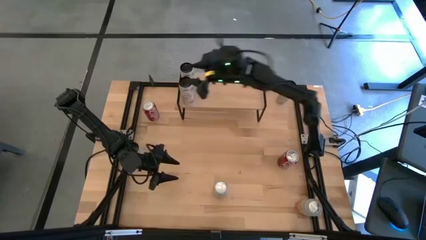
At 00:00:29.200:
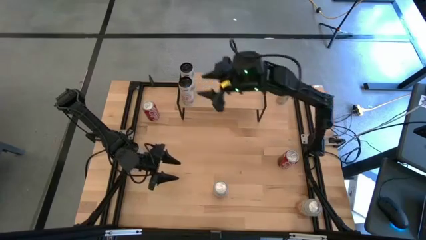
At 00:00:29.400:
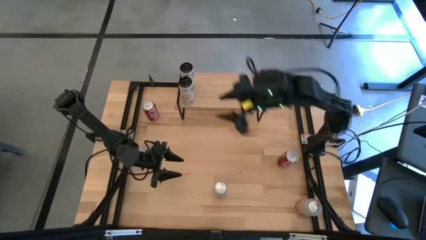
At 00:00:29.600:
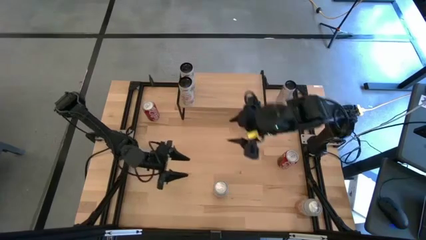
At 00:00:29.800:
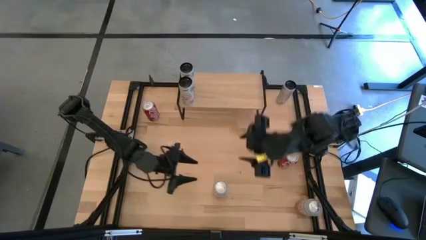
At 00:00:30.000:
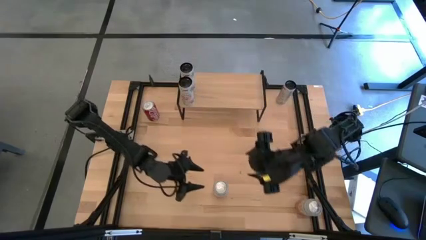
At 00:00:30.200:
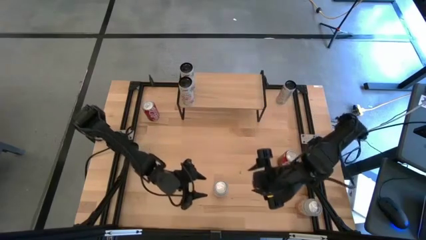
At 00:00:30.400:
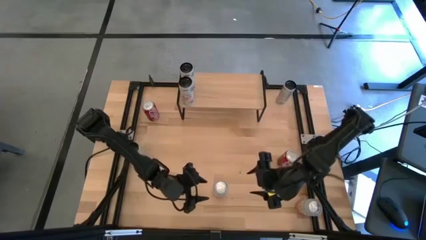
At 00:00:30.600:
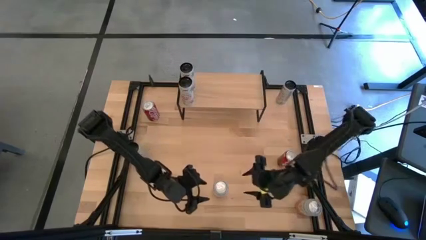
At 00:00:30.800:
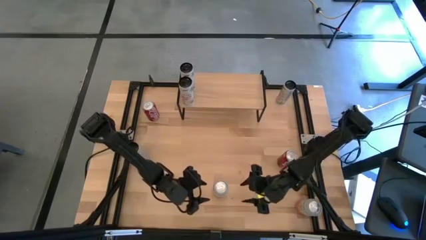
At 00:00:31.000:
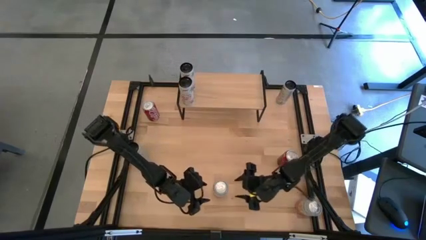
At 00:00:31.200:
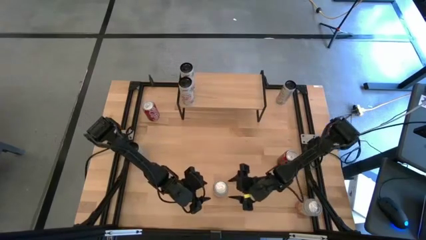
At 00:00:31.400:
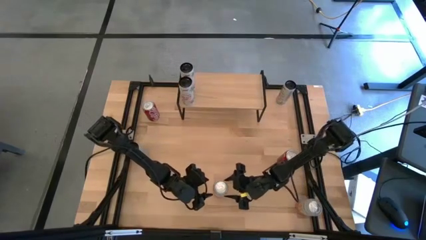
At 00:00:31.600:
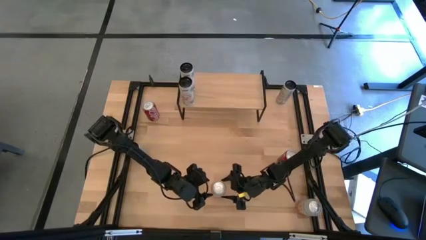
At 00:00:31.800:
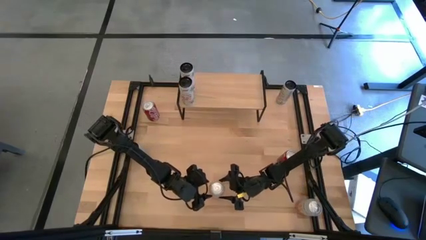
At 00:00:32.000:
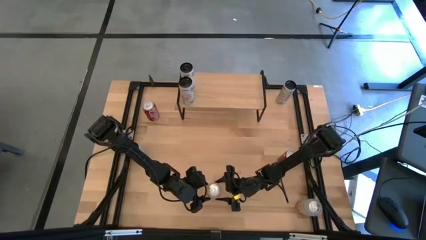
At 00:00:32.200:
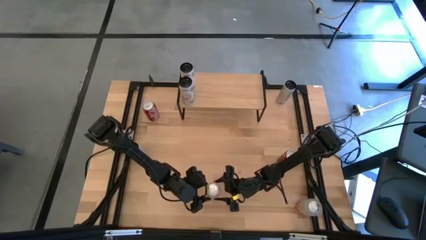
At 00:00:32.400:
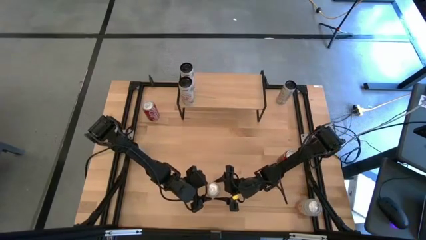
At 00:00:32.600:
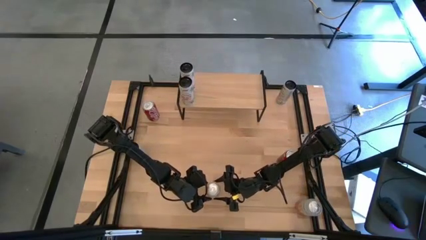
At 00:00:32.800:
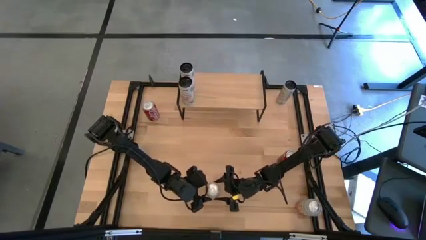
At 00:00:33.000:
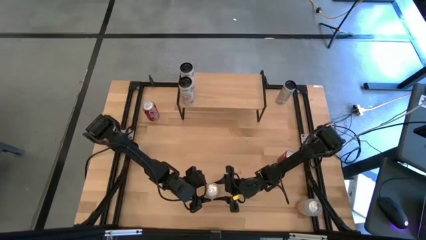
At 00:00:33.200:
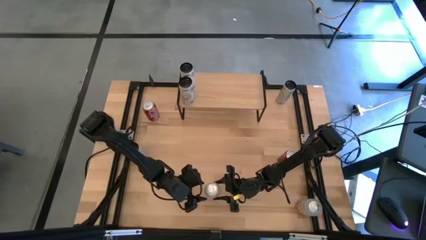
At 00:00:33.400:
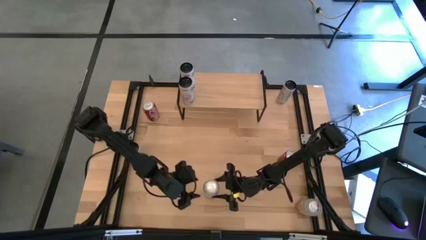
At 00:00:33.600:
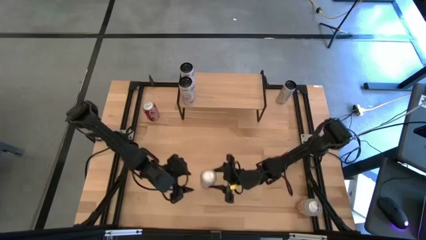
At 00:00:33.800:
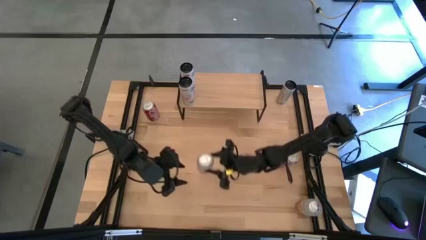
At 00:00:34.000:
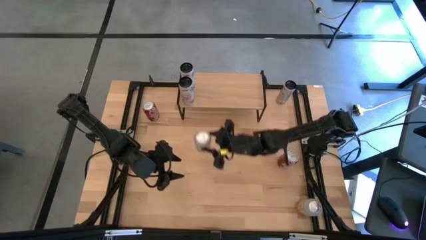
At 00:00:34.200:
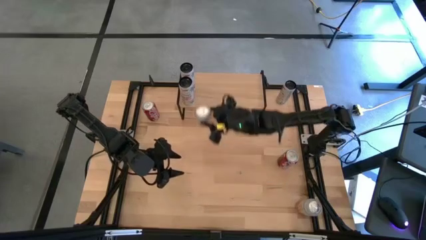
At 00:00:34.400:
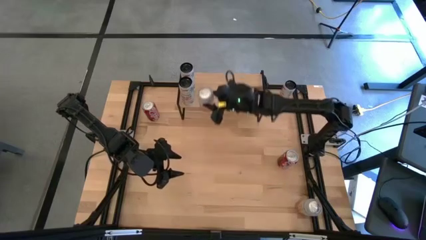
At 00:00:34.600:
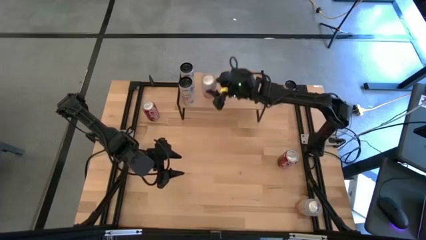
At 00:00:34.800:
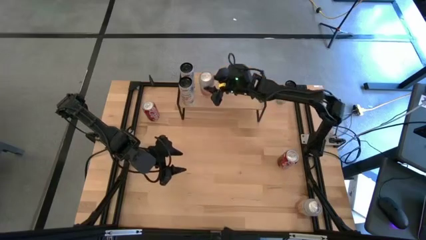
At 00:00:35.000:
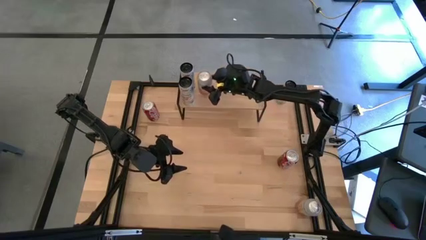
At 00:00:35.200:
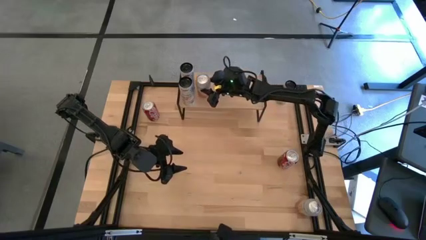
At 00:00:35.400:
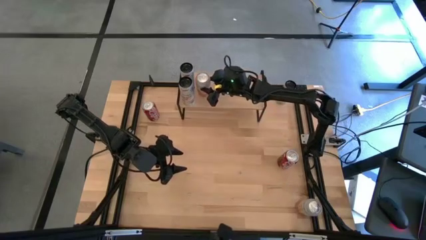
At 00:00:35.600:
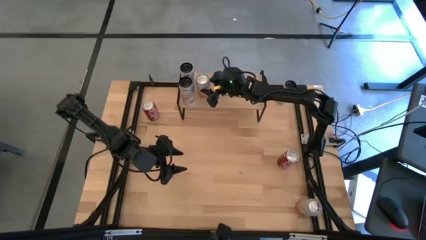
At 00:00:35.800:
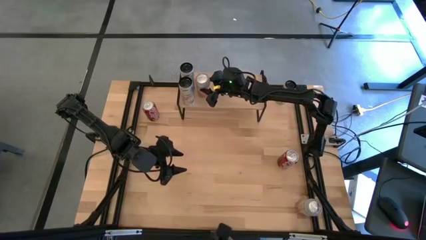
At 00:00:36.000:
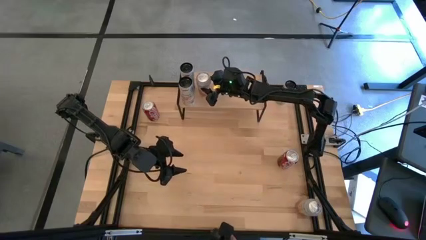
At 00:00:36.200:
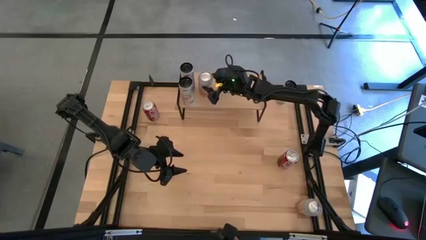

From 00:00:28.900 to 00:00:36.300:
Task: Place canned beverage on shelf
Put the left orange white soda can on the shelf

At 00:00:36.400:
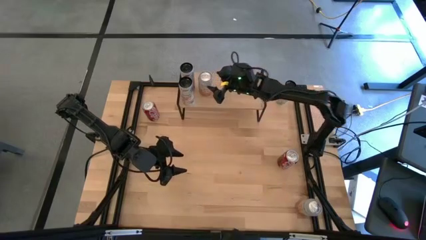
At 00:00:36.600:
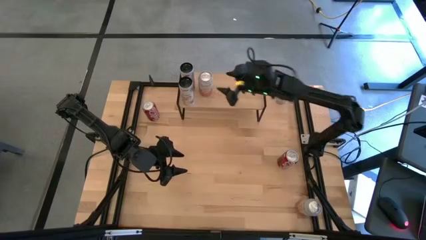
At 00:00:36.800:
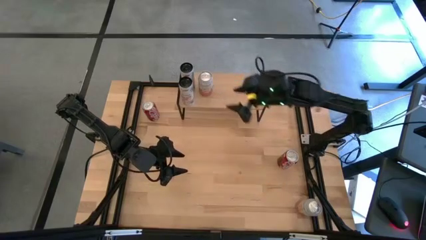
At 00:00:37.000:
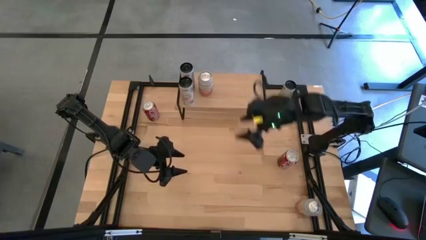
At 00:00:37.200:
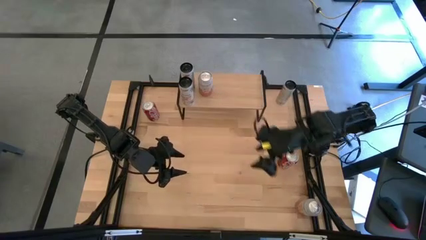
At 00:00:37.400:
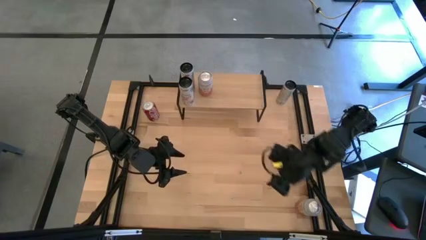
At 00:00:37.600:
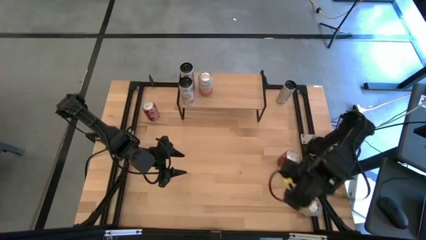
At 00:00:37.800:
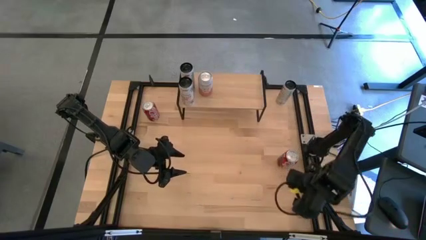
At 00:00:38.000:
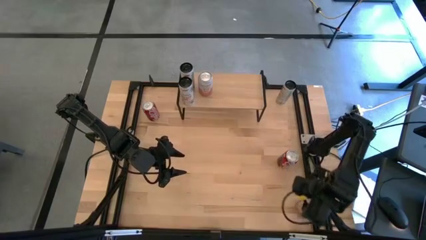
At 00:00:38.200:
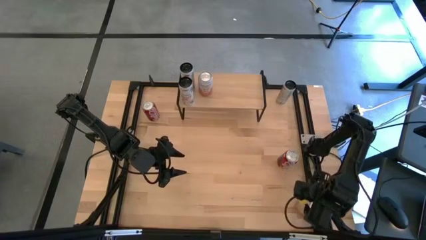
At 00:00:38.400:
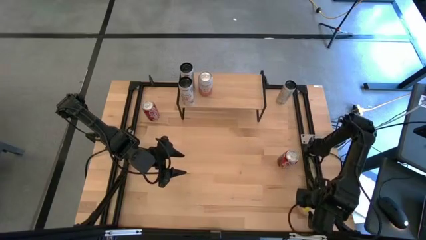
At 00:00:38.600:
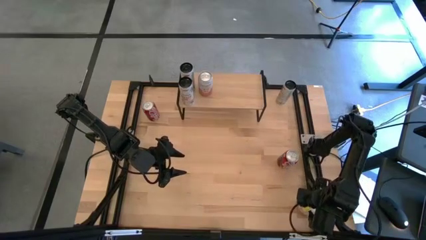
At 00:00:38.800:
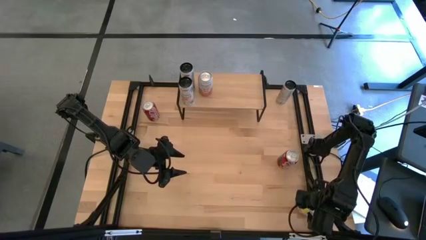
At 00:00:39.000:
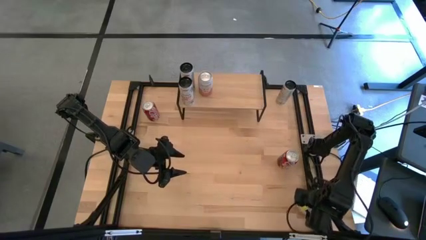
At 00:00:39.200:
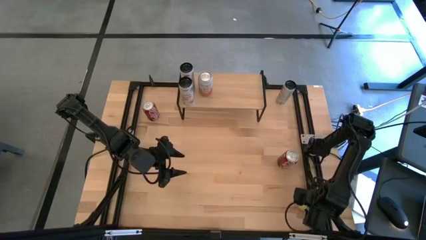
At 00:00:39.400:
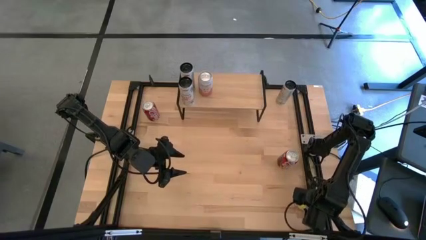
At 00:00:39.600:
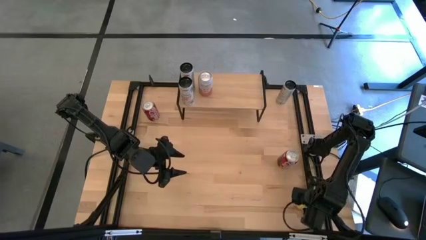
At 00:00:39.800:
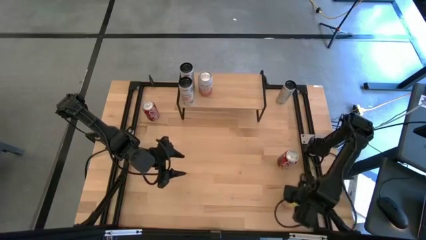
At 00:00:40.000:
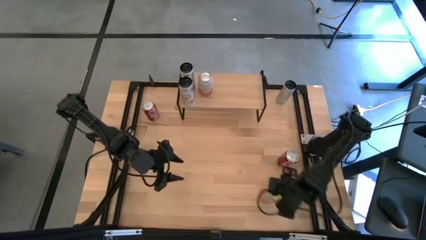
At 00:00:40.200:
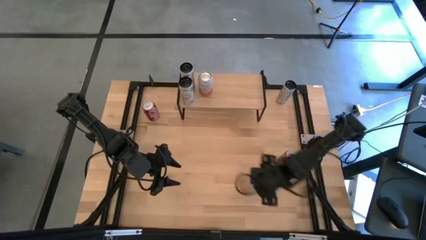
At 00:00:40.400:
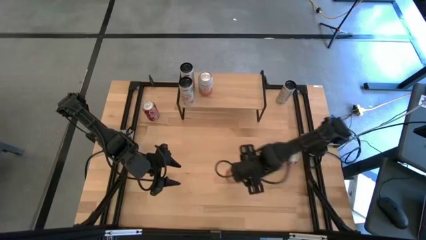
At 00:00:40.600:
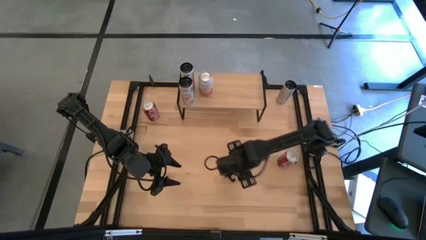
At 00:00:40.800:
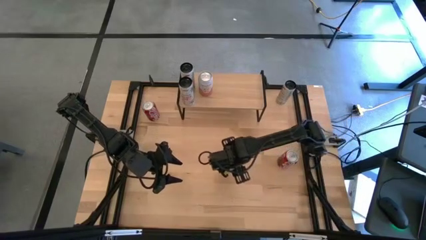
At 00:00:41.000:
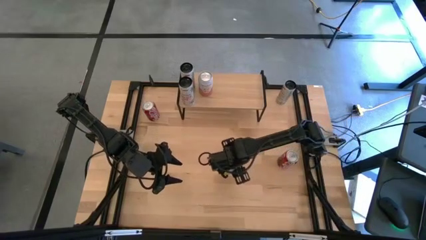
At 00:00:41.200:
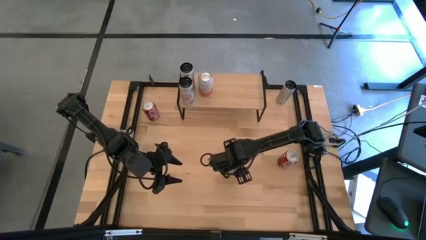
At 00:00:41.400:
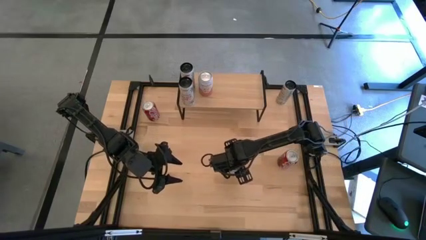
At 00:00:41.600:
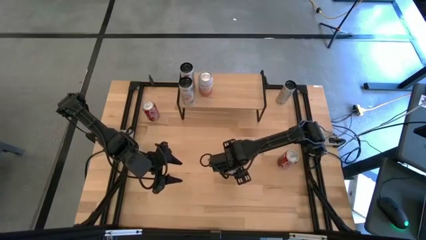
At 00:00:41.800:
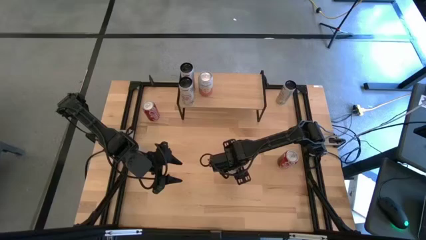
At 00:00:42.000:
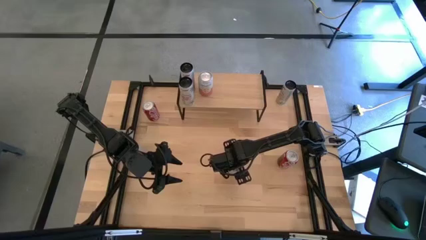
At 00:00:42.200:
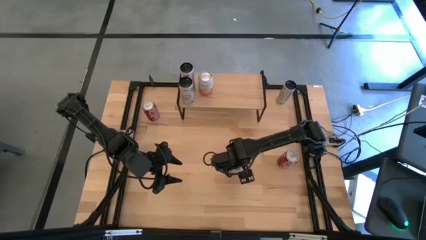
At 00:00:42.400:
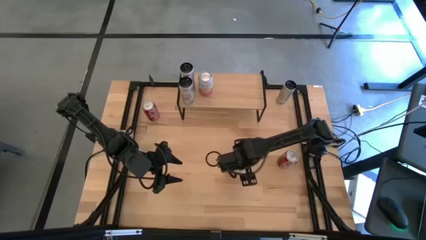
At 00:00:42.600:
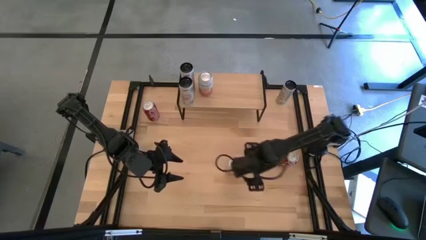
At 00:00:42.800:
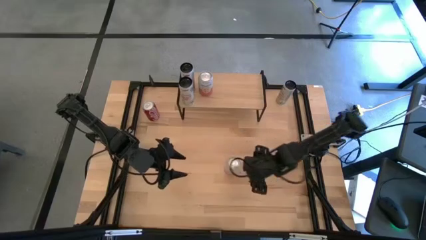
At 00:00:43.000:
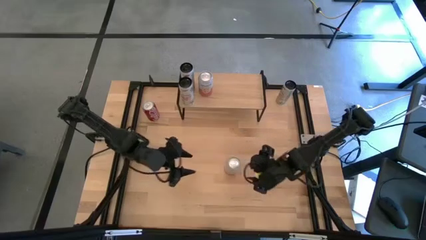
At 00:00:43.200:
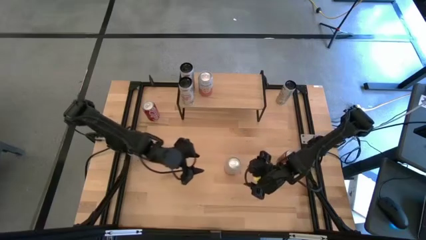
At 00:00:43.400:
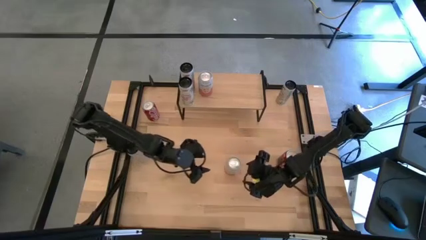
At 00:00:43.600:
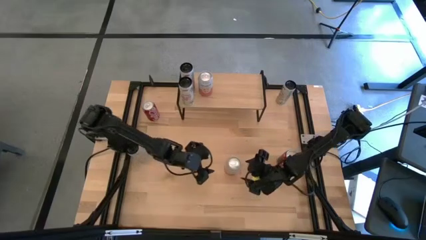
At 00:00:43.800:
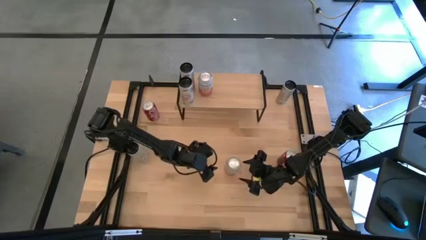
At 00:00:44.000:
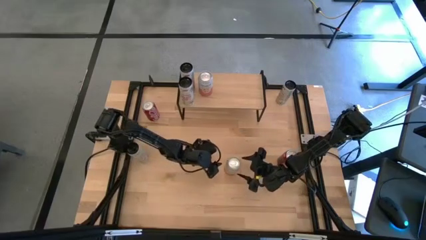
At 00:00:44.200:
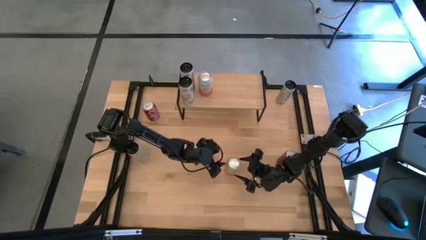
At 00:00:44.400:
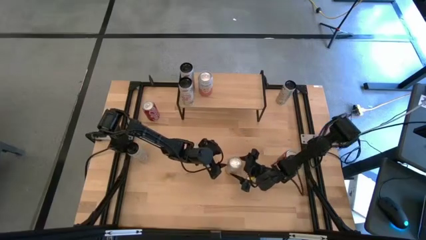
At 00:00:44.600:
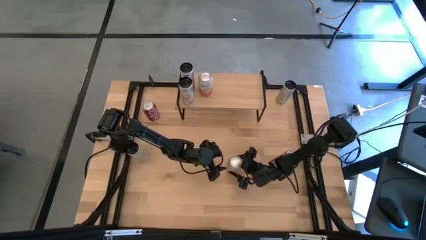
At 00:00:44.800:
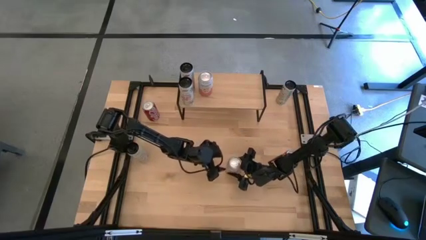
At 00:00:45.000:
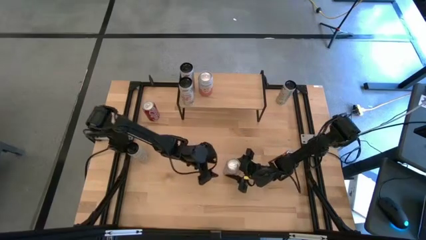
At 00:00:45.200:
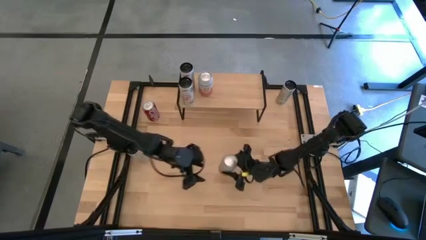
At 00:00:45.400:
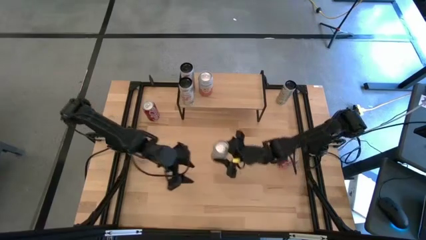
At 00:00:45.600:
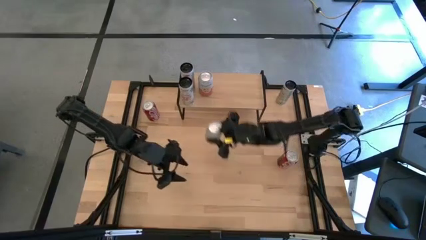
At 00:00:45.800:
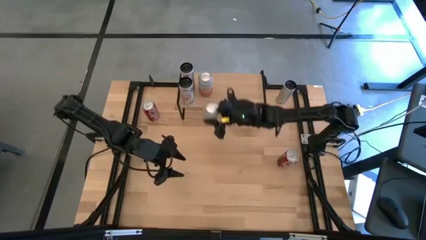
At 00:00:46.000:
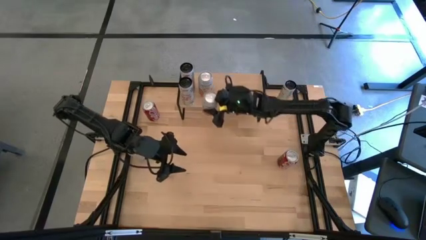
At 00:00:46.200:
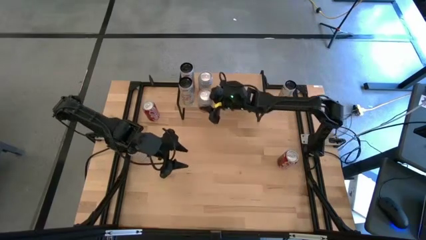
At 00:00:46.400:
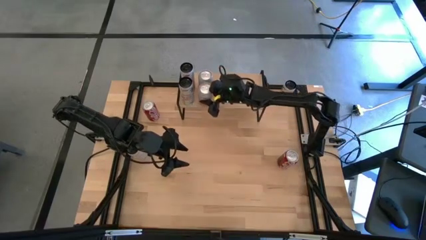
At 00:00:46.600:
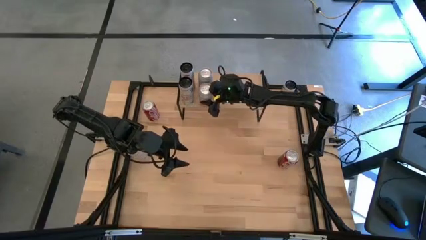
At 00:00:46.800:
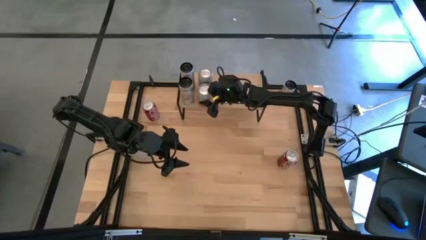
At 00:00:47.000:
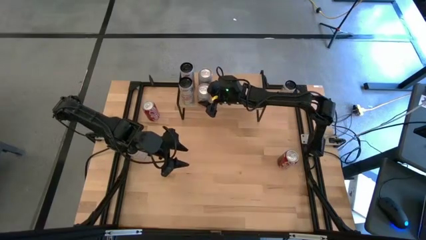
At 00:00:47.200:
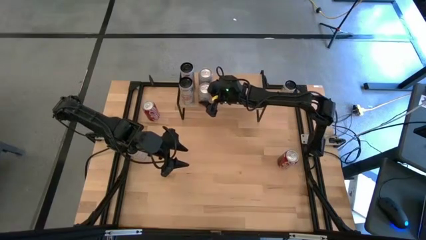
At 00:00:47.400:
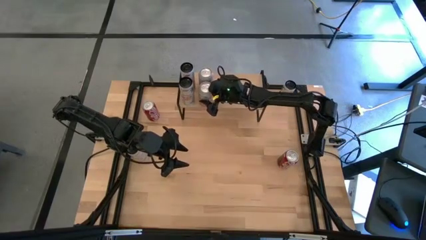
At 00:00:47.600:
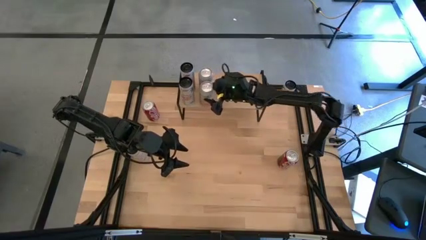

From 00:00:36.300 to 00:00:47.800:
Put the orange soda can aligned with the other orange soda can on the shelf
